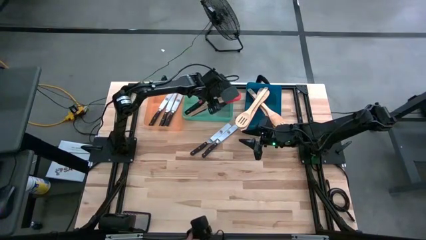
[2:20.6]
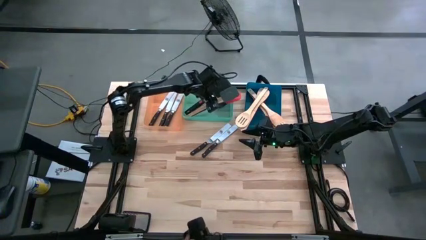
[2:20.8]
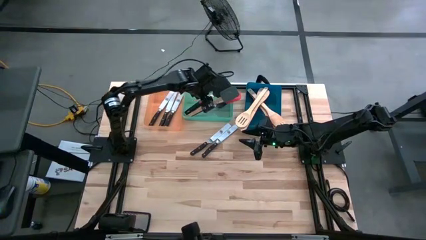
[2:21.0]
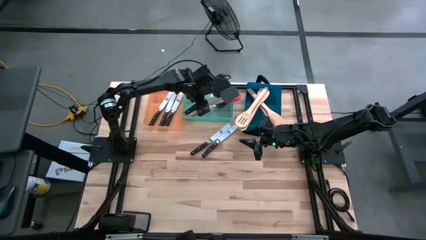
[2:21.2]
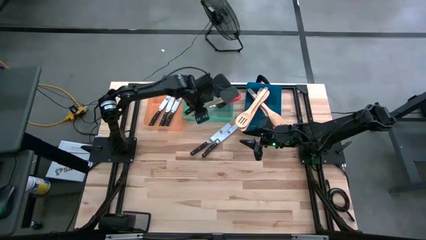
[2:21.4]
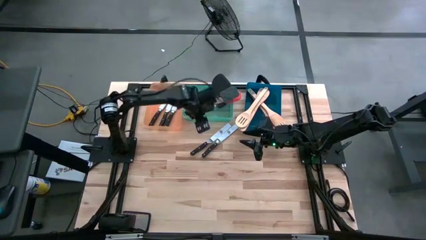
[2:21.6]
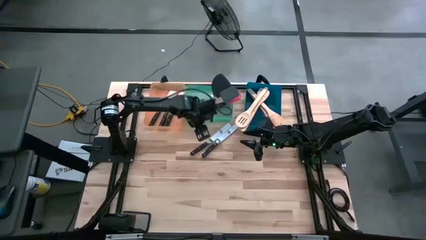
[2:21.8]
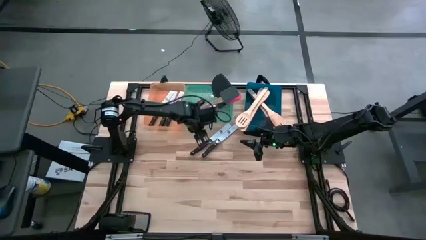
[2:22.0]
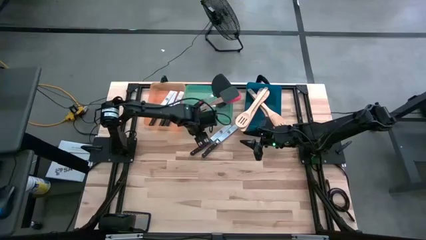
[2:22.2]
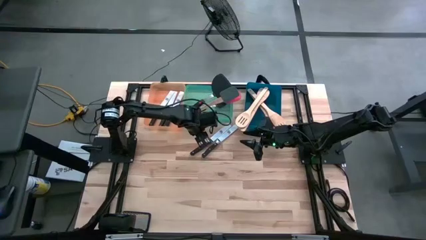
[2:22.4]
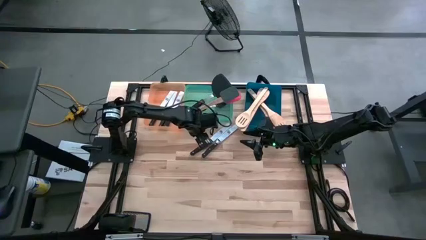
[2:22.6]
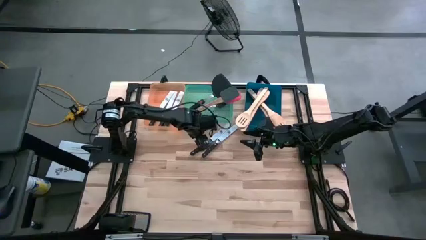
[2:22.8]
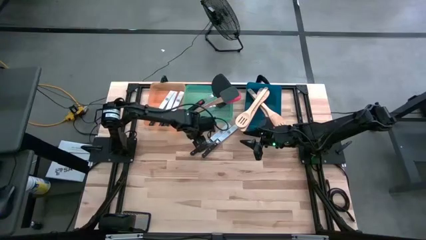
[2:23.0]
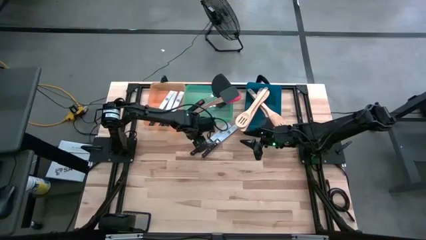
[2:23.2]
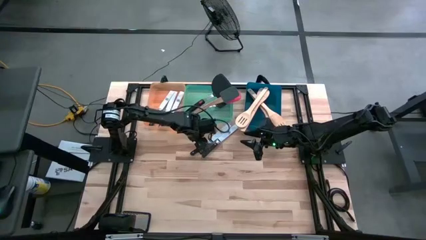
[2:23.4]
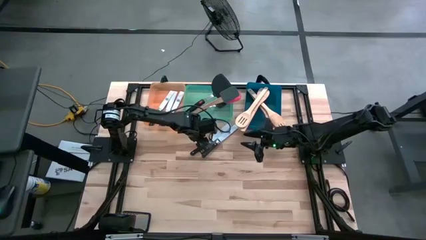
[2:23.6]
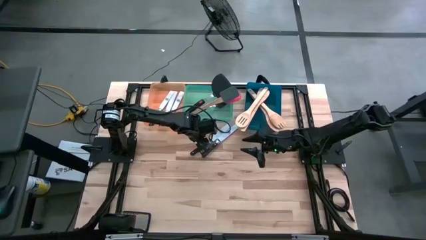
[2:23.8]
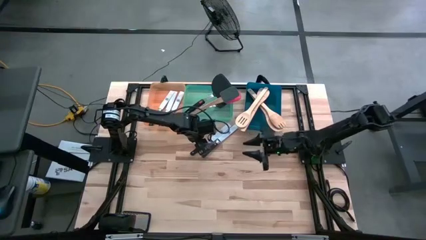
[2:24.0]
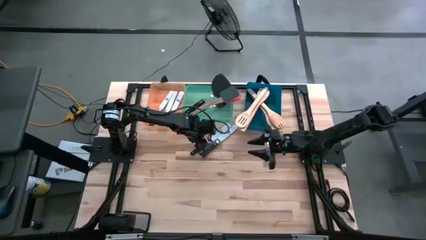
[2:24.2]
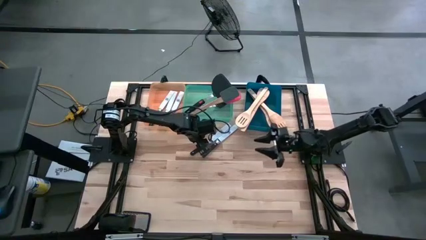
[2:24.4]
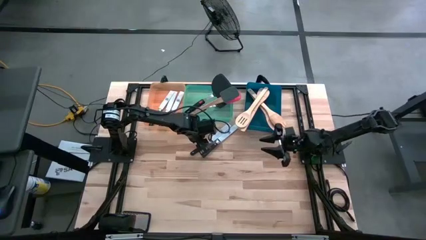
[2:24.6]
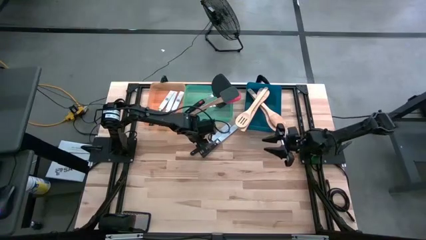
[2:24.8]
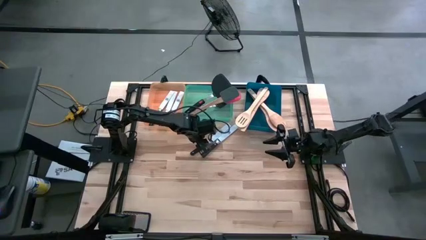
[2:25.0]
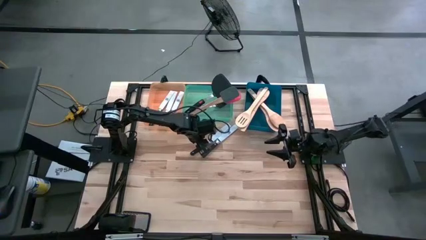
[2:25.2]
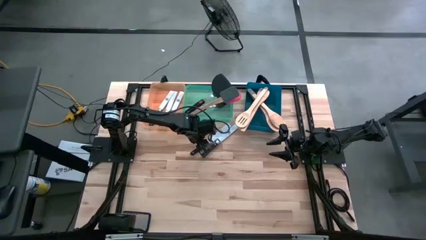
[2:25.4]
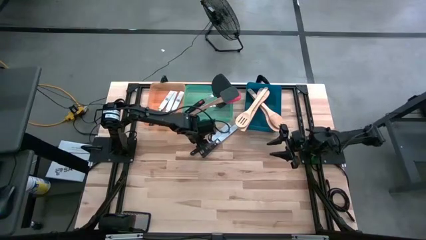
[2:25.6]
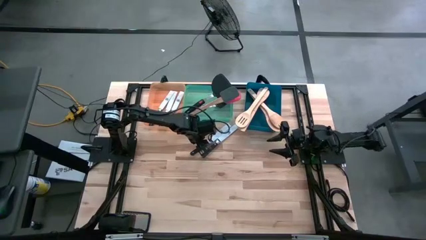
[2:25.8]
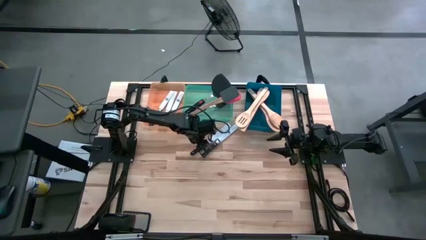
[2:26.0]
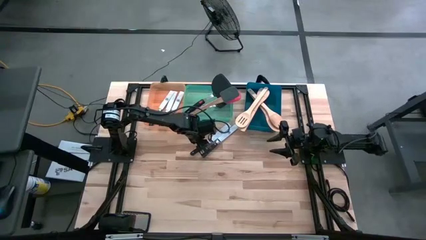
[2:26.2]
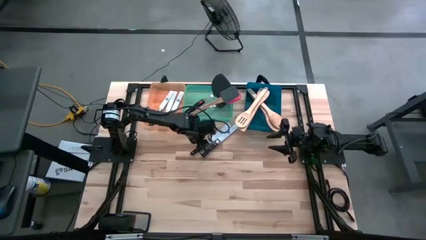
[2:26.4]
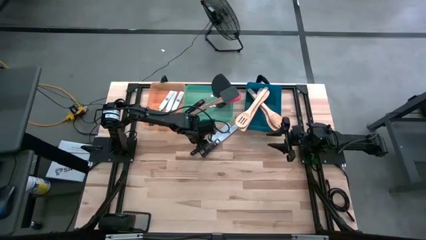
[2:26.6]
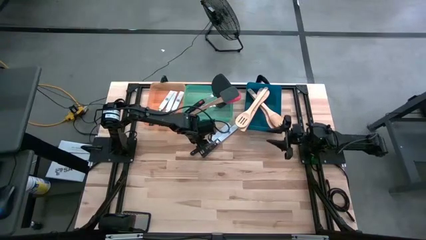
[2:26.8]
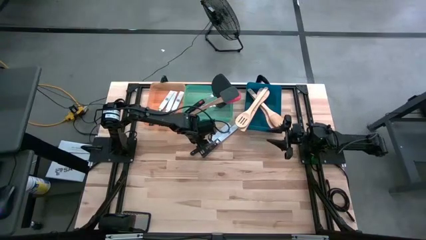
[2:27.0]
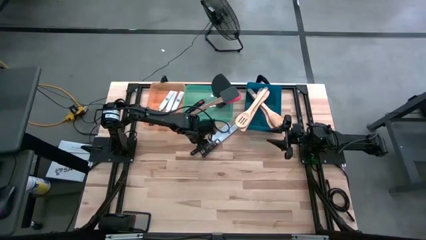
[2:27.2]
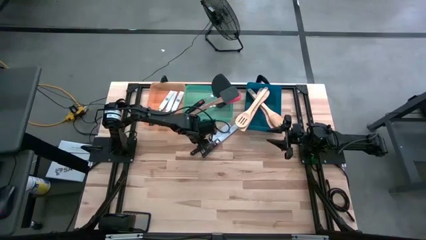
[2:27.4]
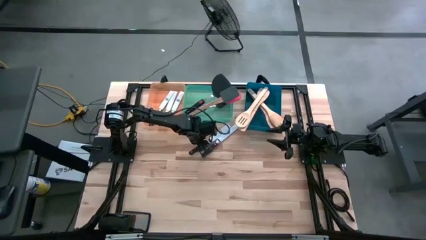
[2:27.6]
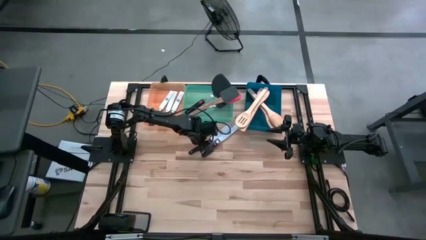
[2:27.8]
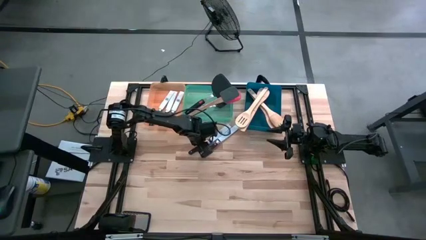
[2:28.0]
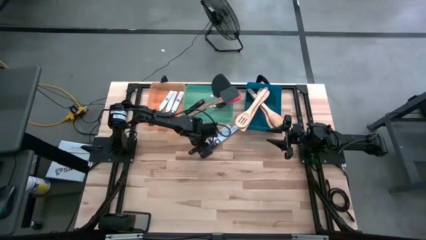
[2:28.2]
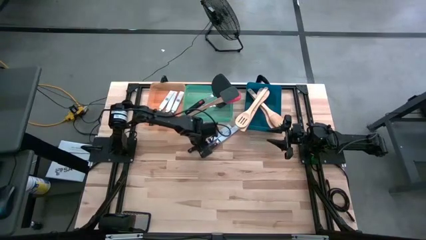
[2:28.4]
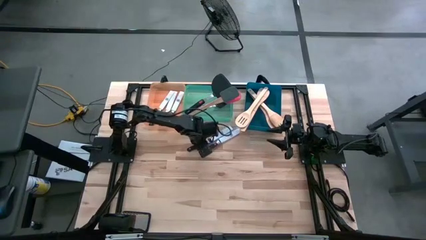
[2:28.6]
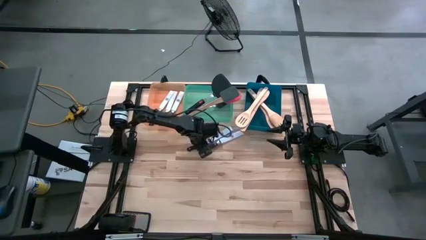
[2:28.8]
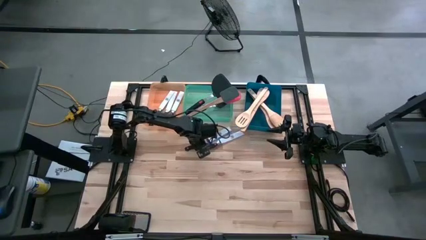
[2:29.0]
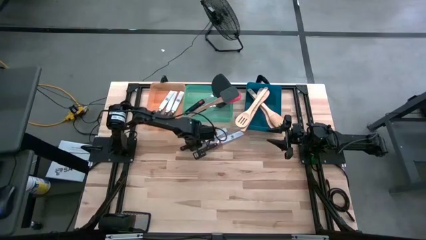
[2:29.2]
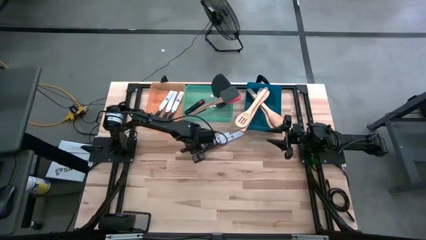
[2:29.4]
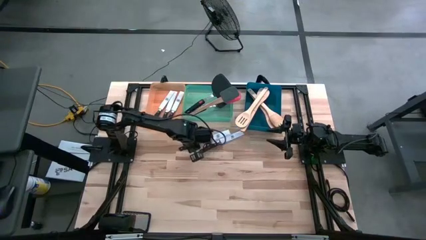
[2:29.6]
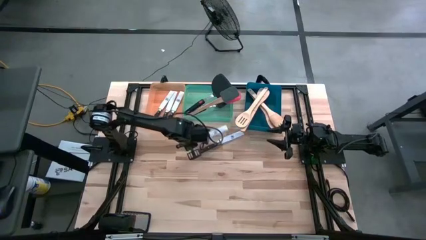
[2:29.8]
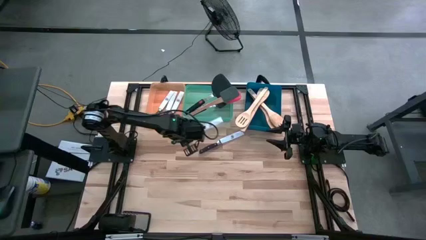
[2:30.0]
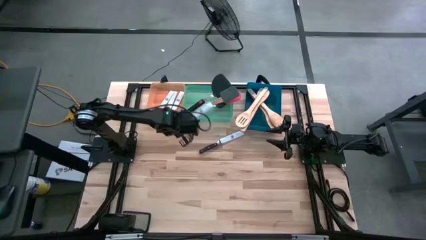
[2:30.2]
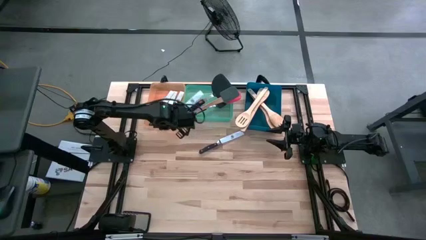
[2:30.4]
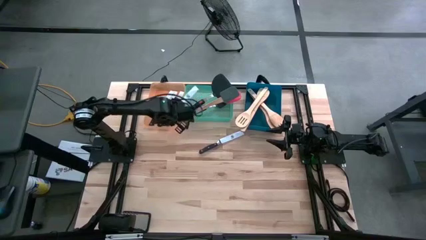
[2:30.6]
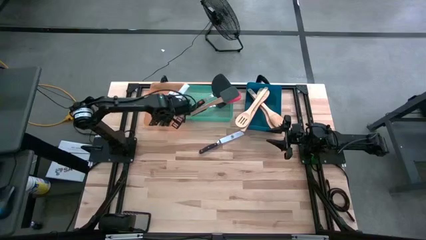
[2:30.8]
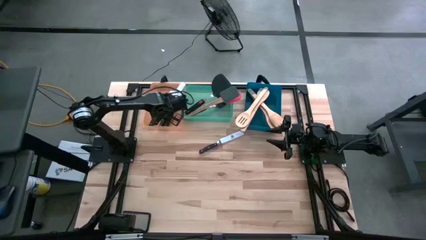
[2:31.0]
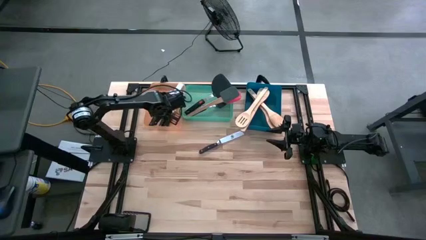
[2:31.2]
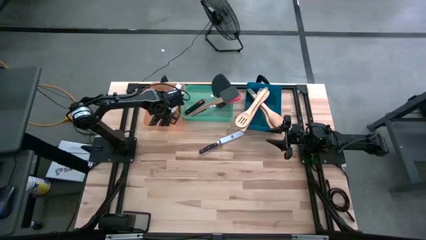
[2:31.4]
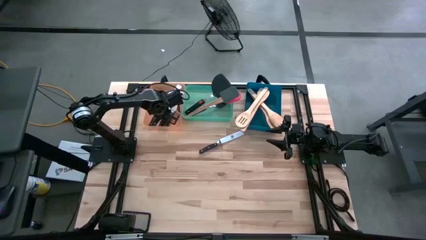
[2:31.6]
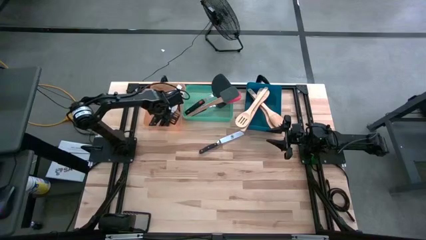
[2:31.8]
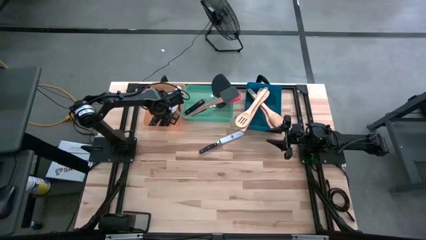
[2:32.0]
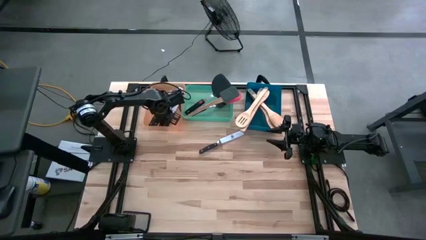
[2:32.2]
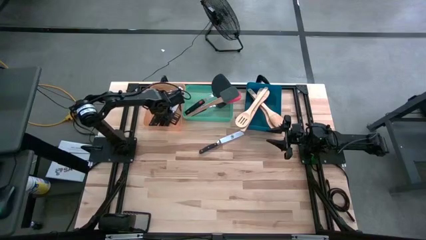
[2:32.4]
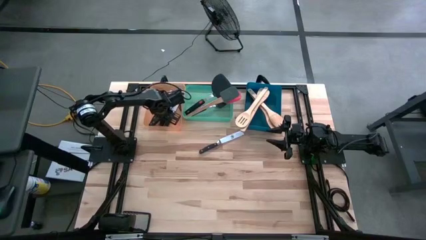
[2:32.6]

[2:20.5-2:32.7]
Task: Pick & Place Kitchen Items
Put the black knife into the orange bin

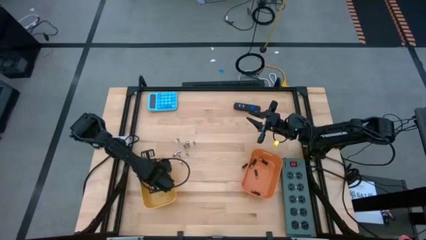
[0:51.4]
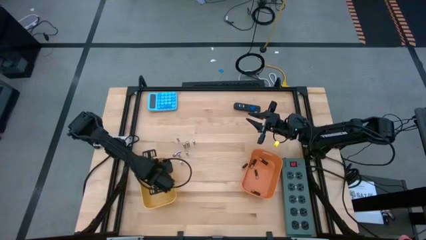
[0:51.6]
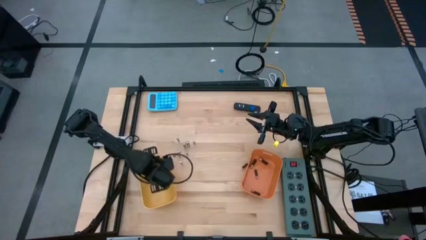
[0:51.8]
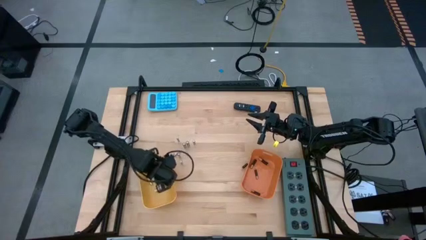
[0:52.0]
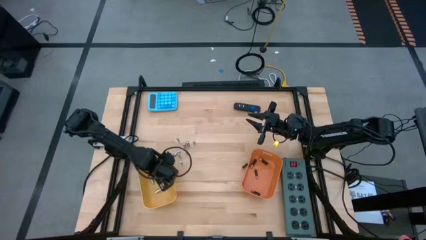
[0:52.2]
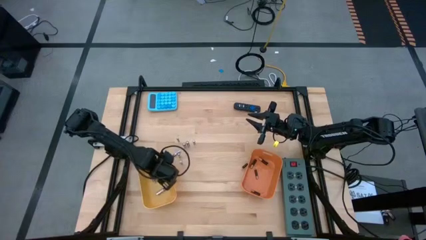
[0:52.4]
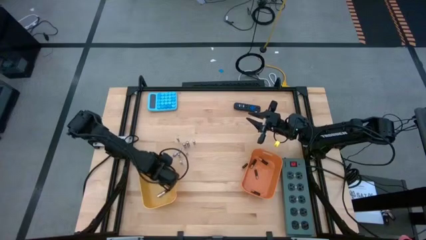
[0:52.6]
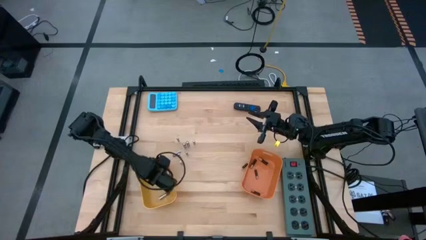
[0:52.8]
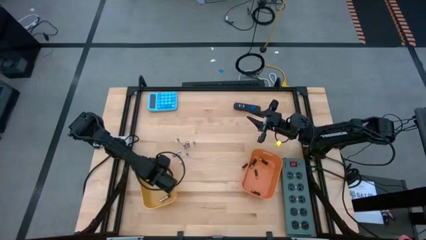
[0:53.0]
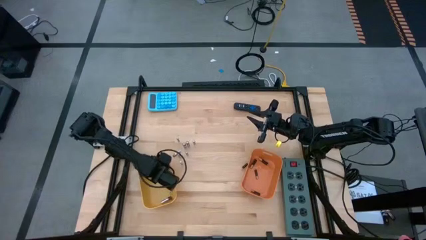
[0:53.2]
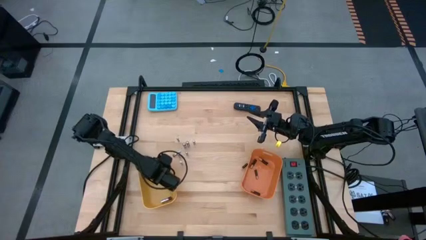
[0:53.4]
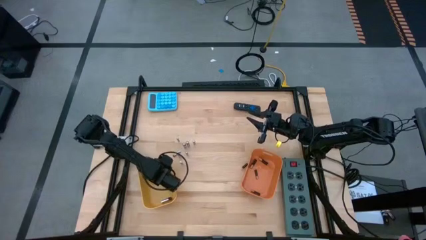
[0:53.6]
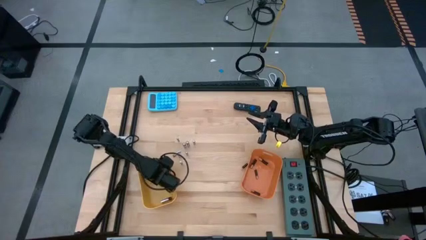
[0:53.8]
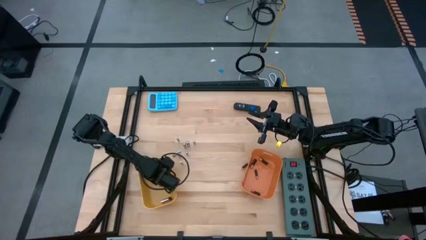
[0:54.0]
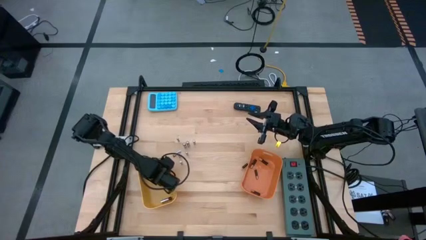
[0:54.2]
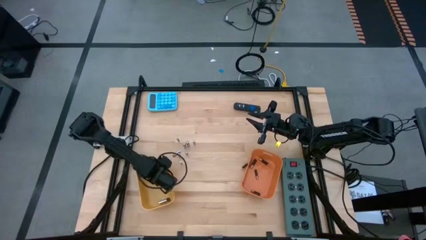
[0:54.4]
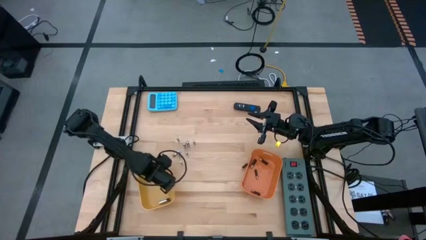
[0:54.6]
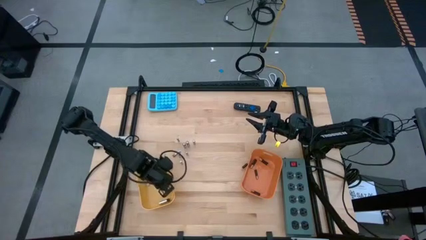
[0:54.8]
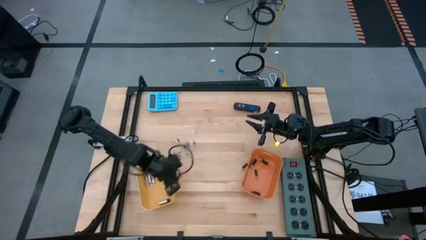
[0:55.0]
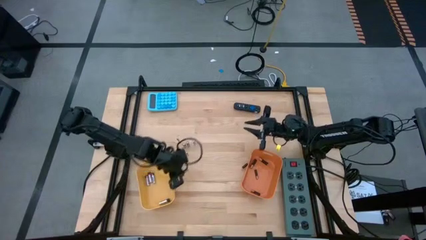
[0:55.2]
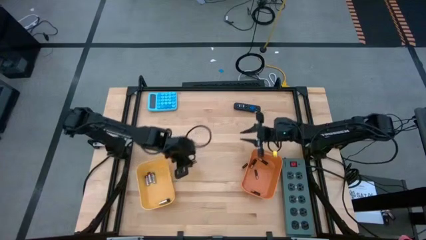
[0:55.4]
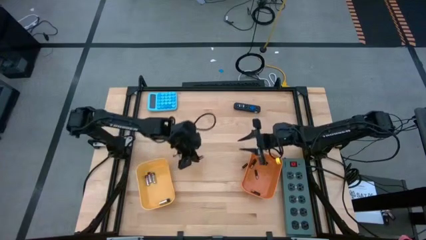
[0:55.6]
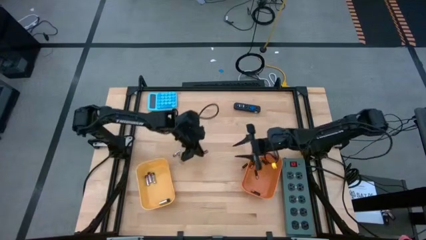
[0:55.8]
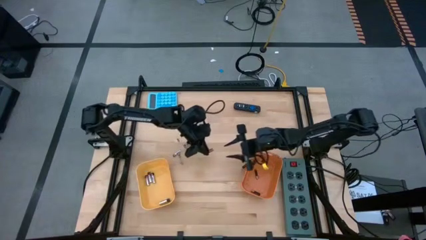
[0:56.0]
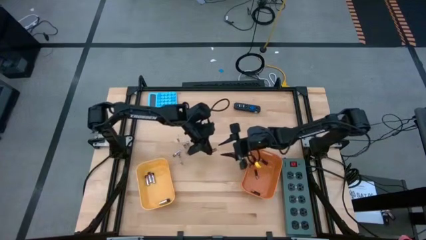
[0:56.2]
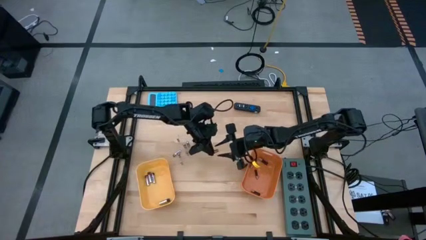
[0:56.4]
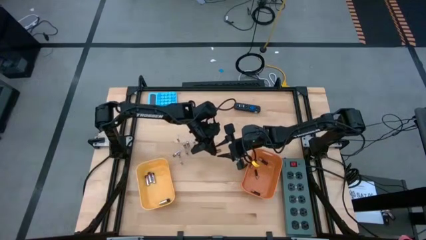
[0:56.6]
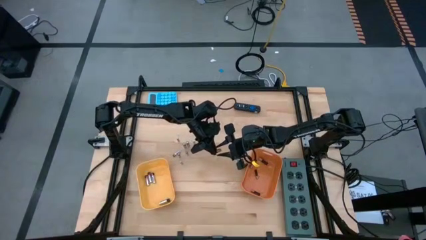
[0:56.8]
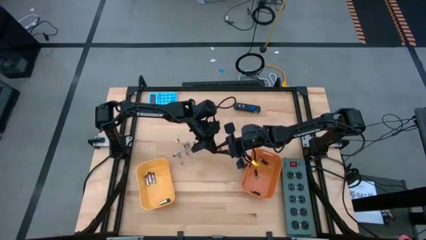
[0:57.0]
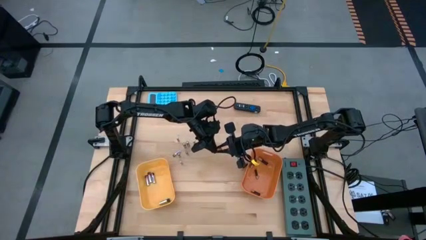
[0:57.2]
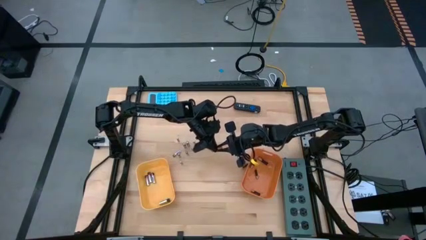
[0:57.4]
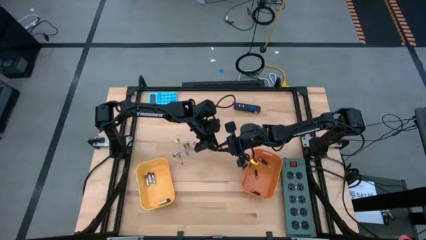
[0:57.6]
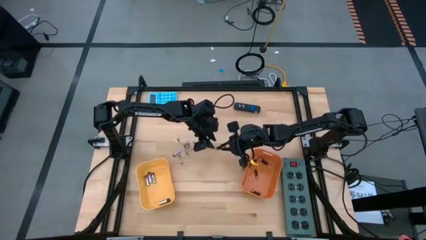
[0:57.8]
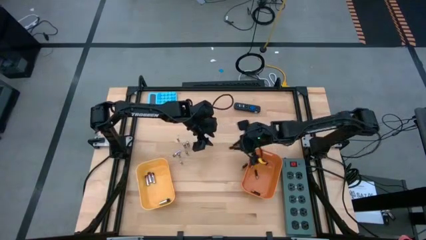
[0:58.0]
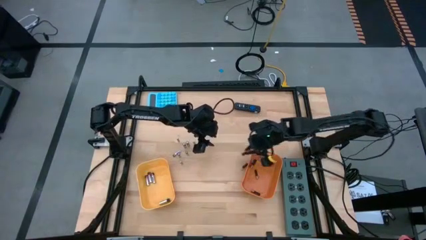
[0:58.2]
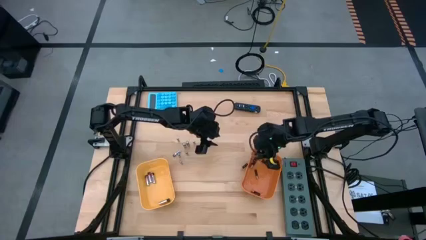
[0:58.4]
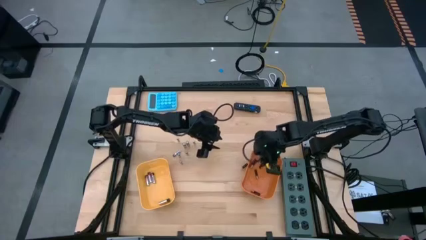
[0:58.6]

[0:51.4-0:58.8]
Task: Sort batteries
Put the brown battery into the orange bin
